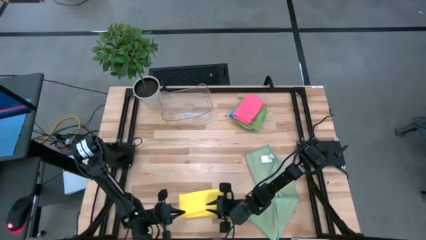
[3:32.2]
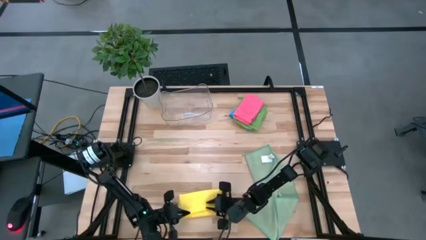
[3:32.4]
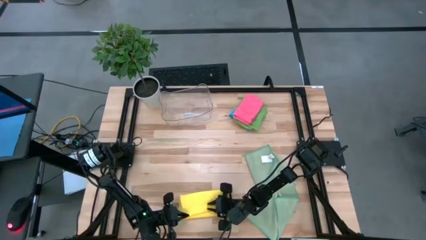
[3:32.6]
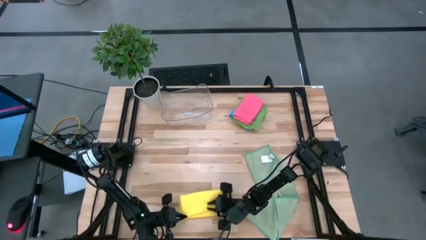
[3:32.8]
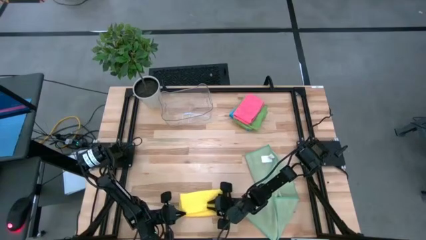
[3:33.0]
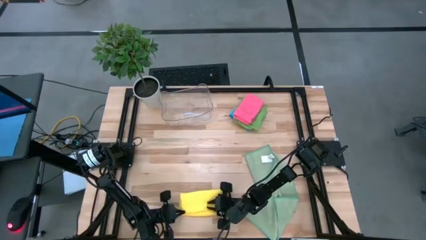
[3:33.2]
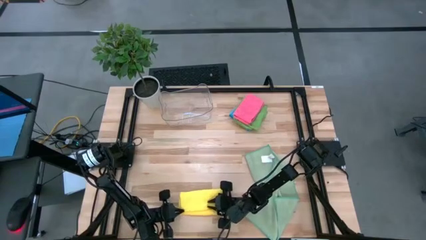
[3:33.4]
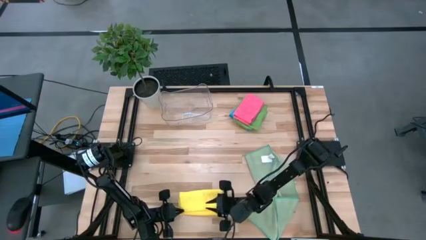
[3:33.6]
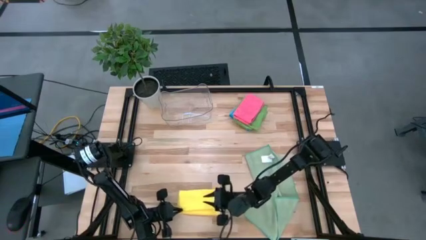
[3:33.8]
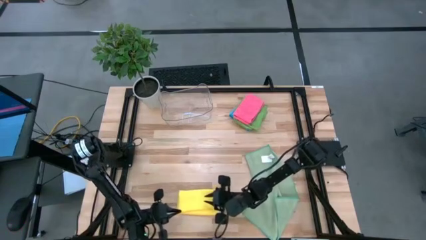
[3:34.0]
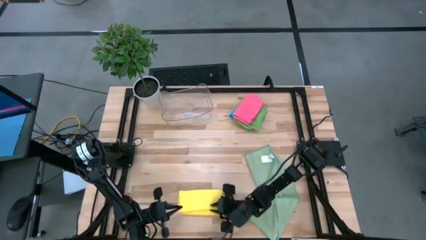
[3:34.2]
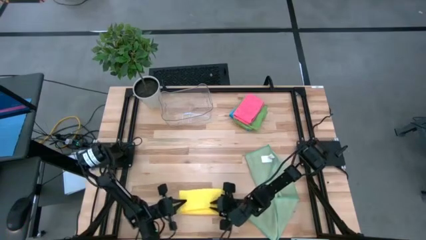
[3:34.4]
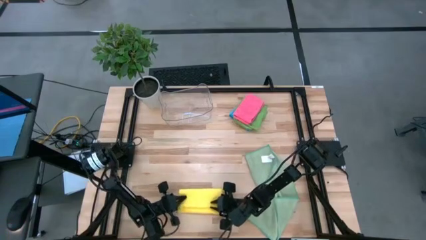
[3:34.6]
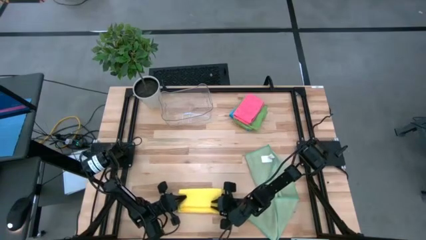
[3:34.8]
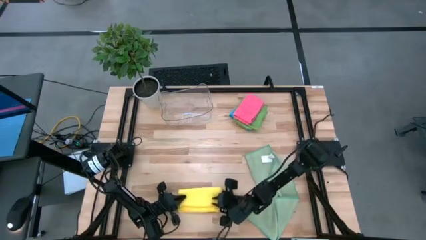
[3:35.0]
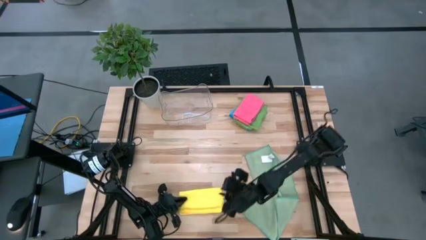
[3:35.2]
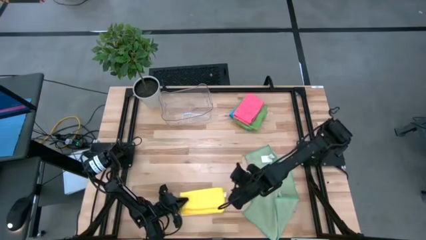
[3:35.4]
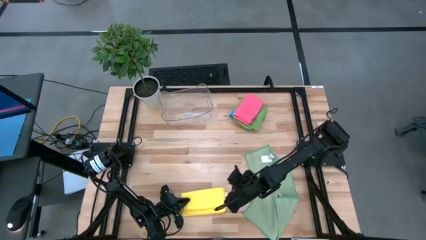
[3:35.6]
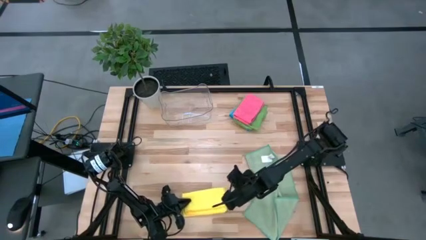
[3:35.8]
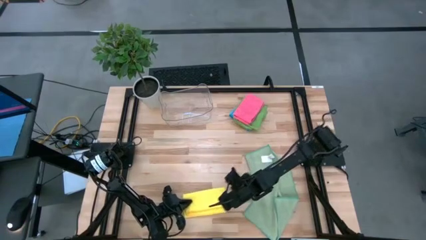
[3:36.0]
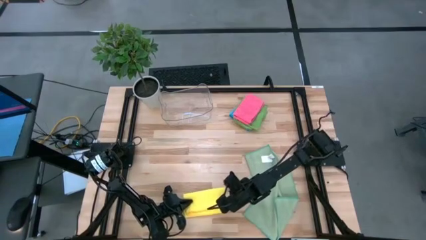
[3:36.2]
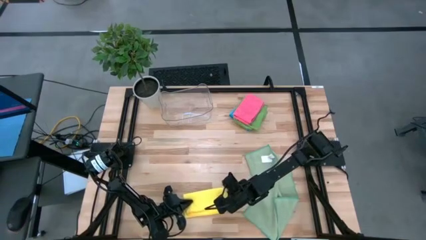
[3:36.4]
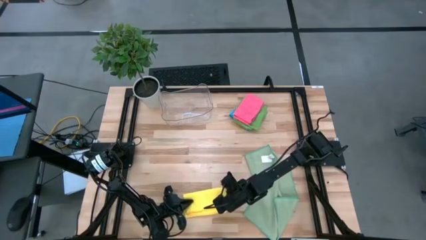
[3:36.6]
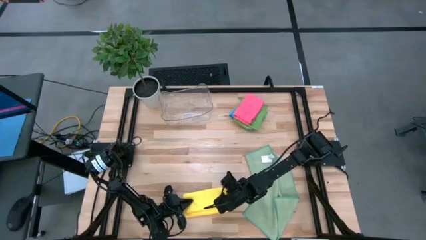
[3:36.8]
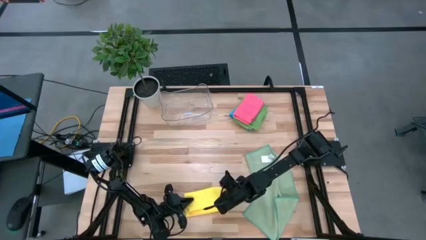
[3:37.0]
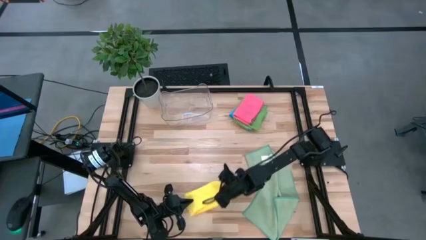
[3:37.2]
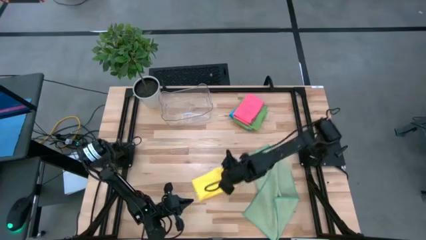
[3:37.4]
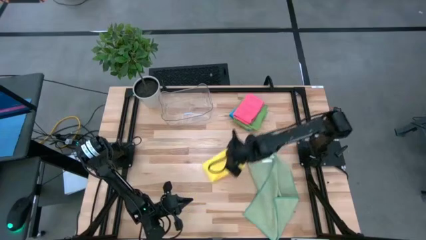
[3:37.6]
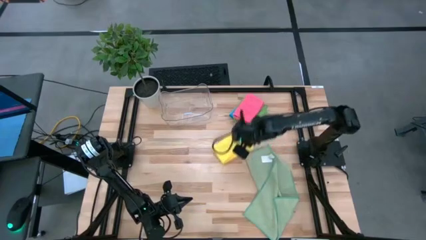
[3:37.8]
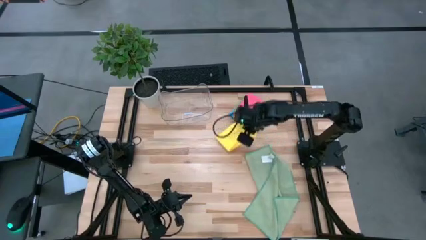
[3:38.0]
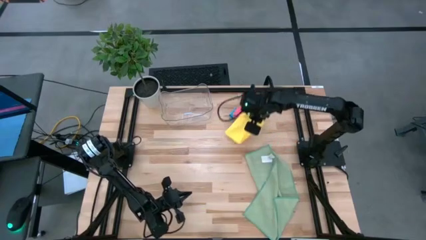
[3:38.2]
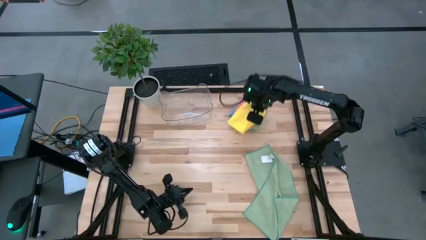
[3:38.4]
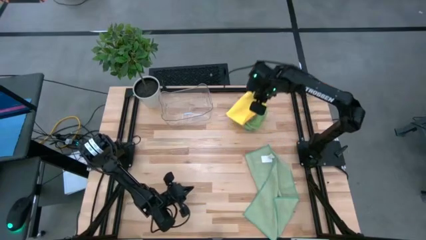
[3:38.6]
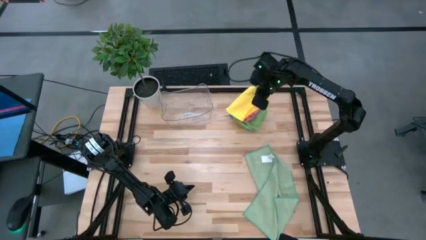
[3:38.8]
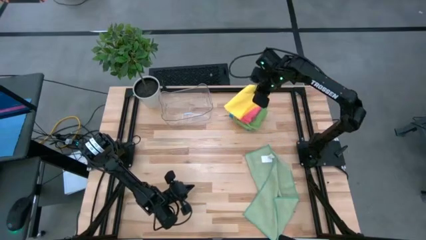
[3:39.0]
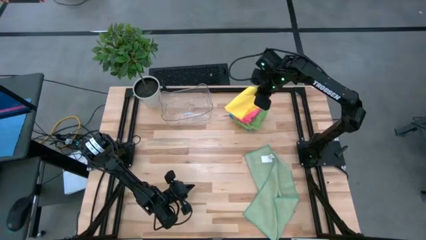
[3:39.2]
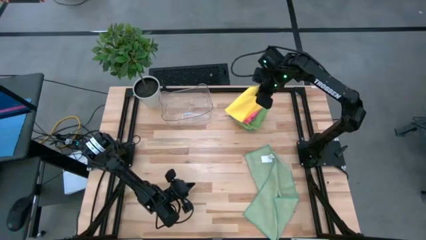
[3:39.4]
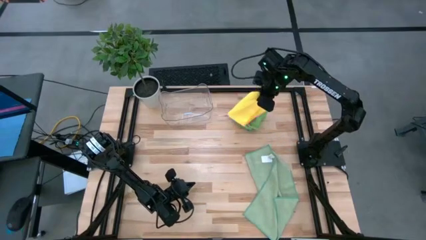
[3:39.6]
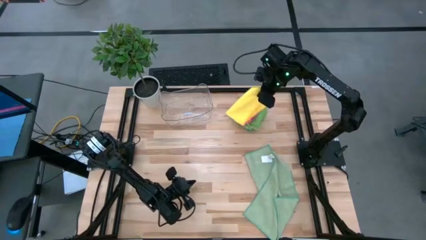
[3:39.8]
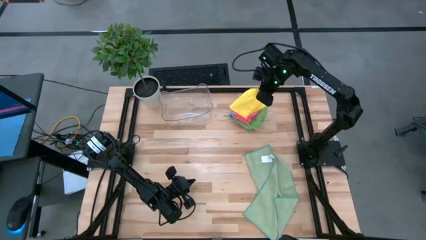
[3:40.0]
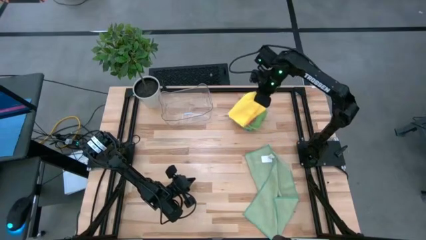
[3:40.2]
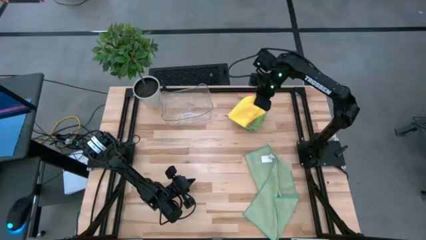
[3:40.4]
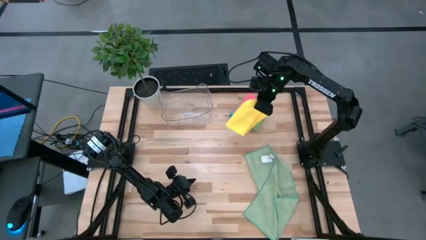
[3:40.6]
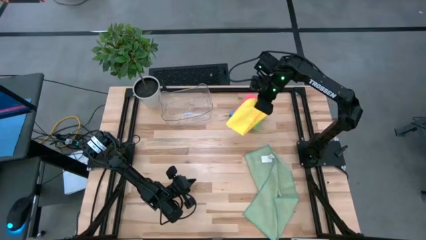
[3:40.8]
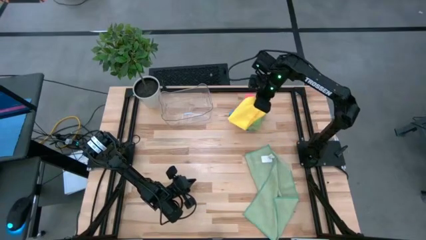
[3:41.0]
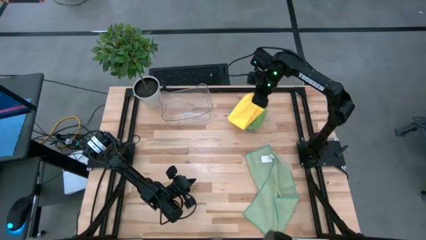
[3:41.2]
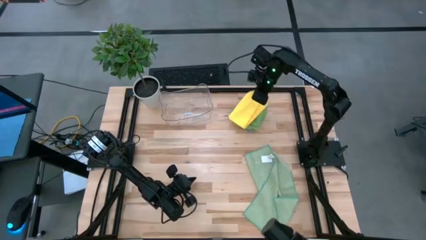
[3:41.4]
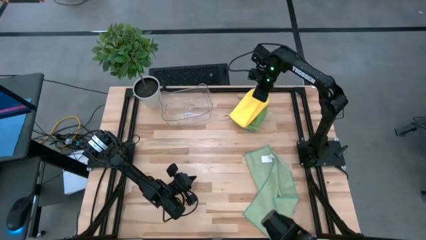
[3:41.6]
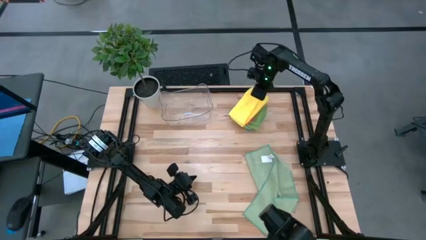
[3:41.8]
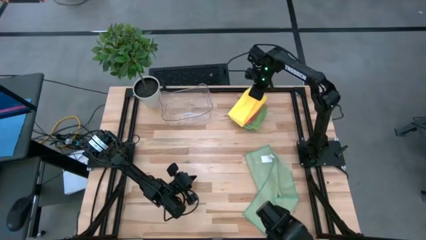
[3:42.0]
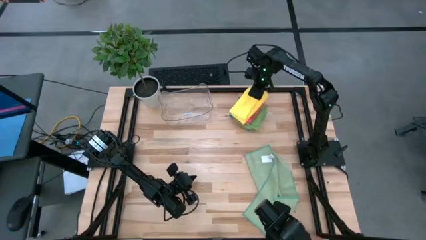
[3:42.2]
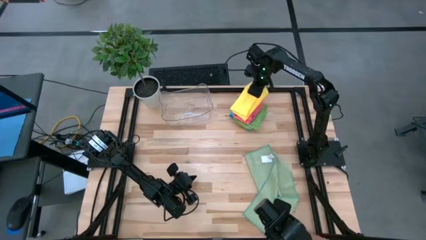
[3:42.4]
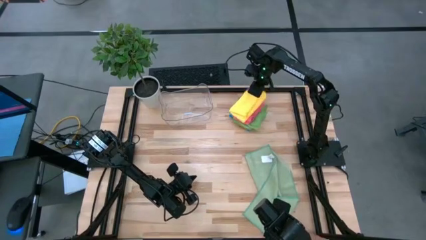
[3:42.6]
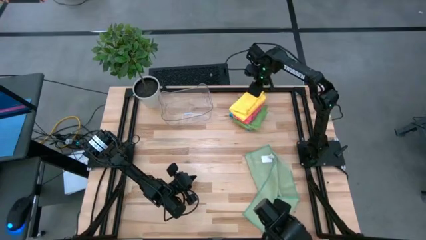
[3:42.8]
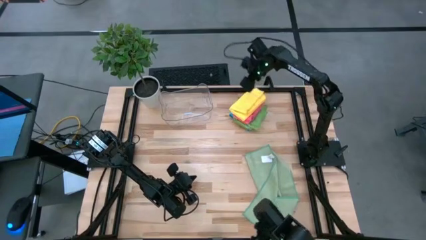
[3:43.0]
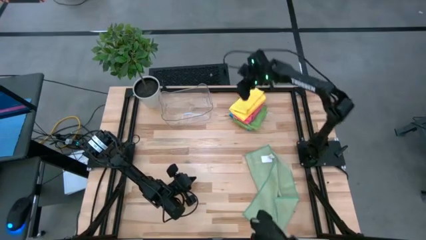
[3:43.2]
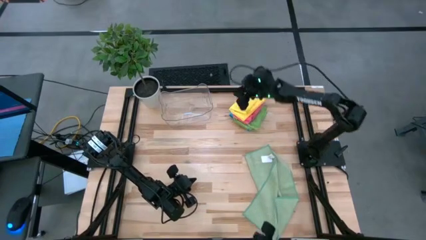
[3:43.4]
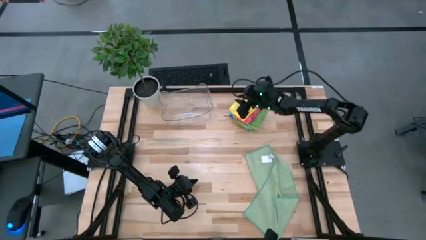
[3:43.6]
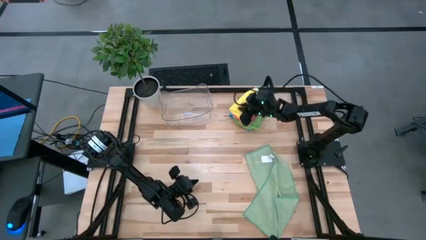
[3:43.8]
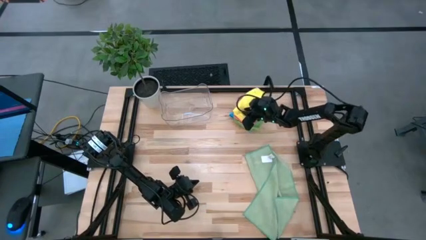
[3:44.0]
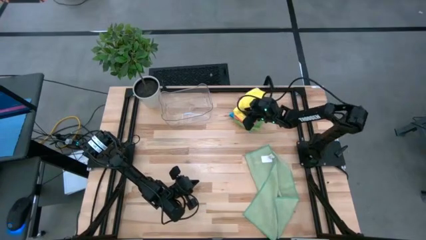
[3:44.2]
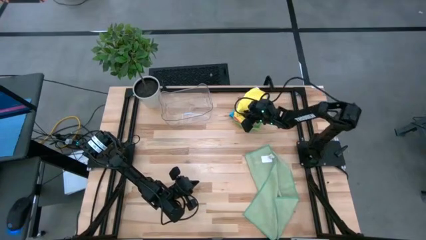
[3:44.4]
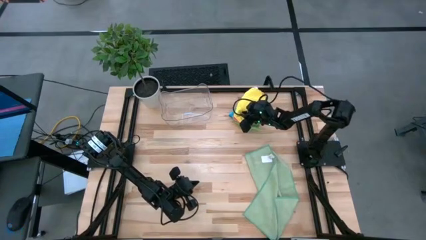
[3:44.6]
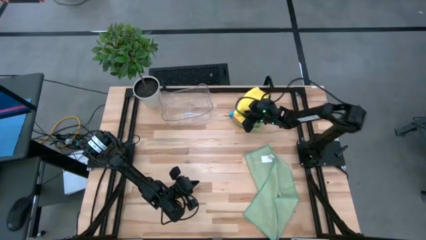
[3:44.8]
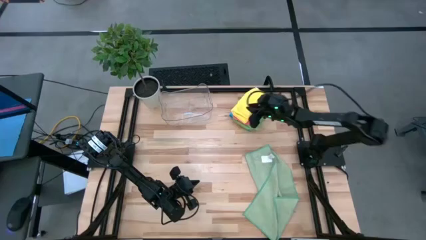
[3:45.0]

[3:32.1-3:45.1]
Task: Fold microfiber towels
Stack the yellow microfiber cloth on the pink microfiber cloth

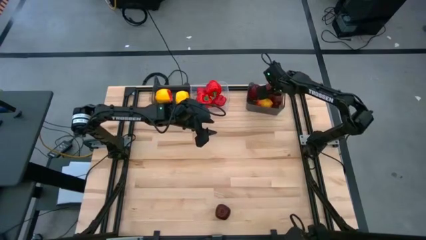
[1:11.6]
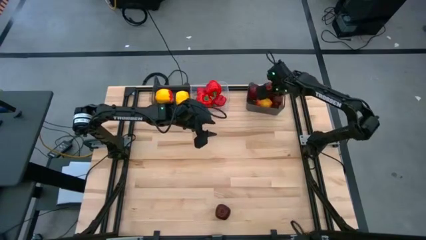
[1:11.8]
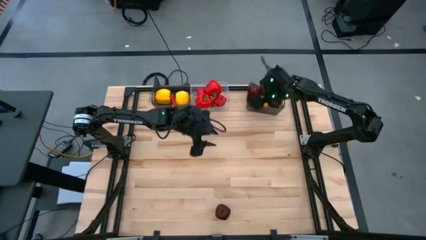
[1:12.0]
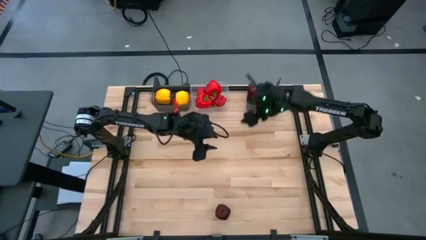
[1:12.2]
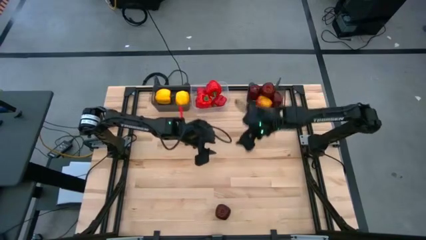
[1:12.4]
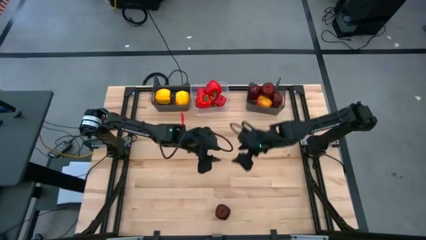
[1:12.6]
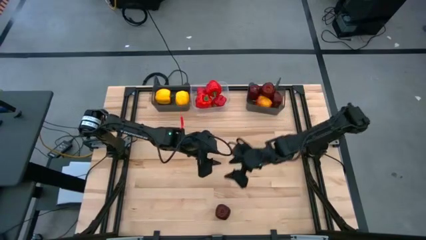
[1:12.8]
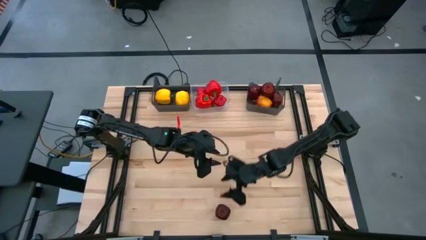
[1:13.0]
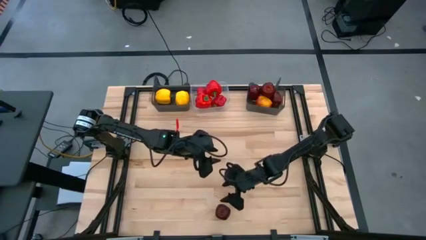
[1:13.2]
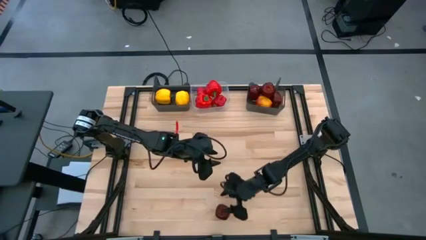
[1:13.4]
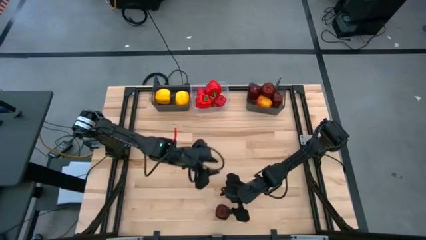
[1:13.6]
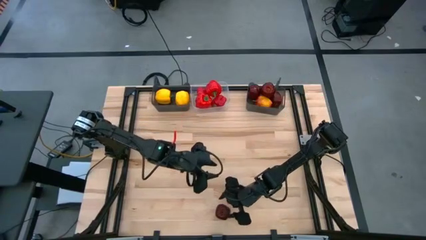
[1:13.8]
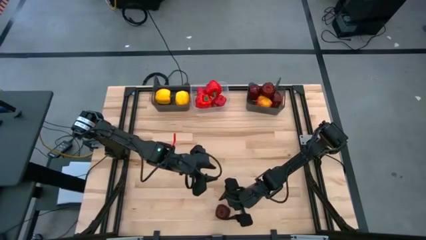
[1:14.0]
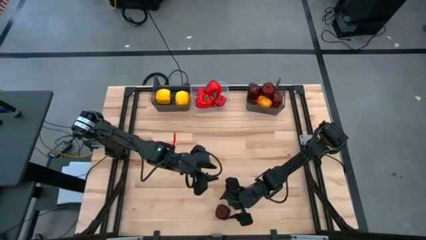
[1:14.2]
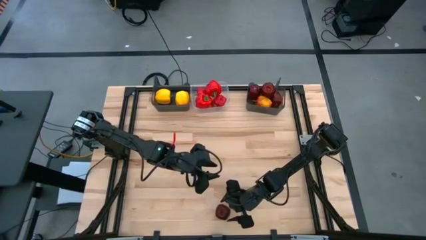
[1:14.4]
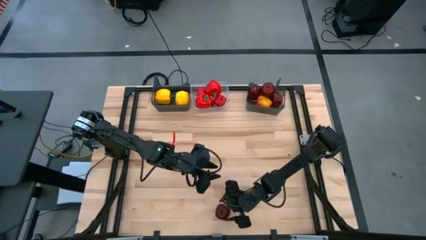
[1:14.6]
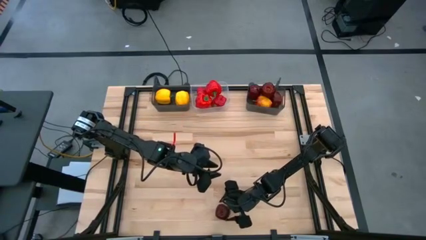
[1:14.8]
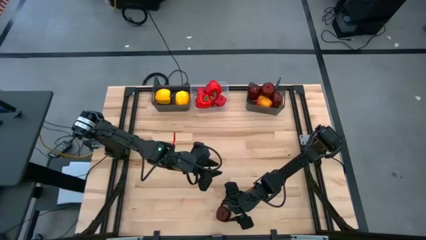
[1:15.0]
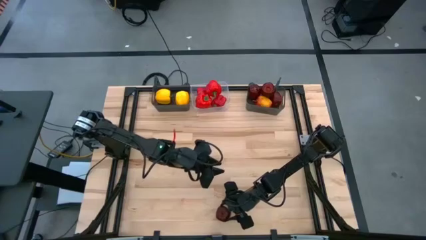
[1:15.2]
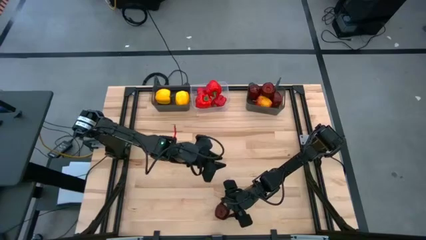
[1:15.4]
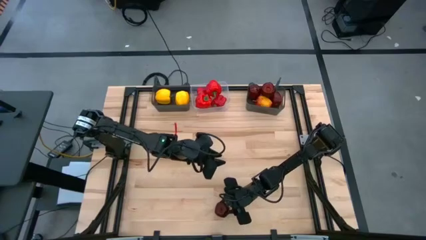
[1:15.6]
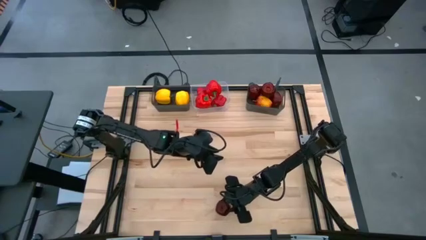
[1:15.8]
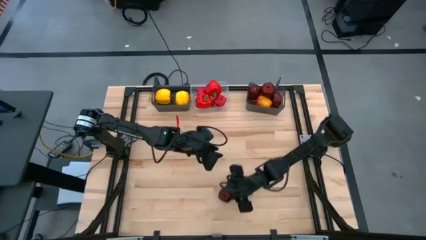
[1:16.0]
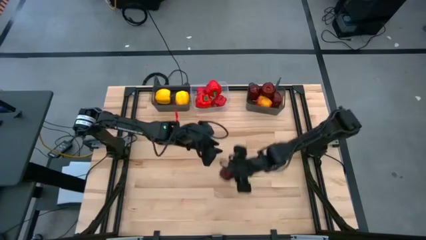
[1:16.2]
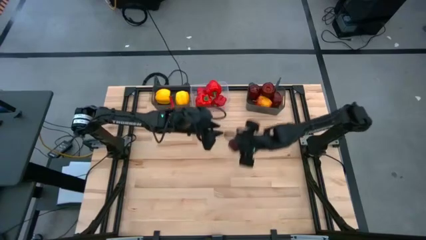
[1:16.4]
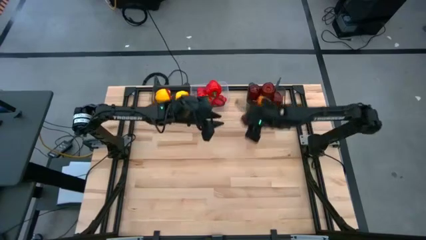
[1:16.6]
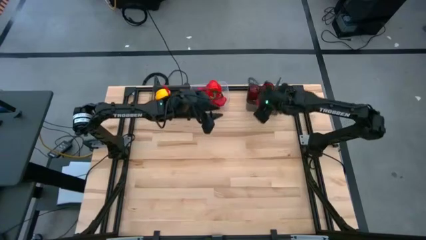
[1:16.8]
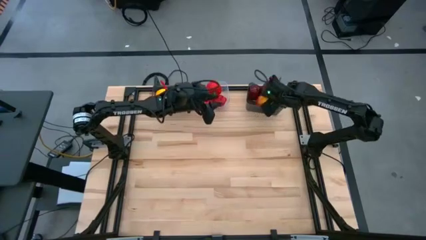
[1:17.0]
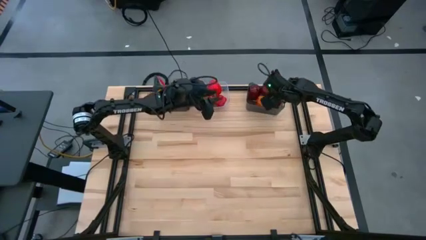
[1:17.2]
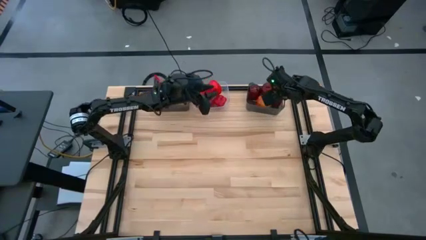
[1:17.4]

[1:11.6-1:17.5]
Task: Sort produce into baskets
Put the red apple into the right black bin
